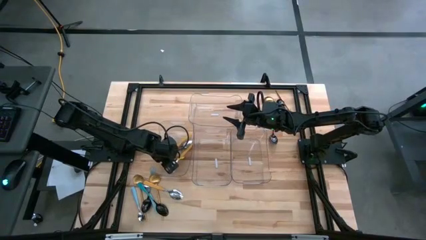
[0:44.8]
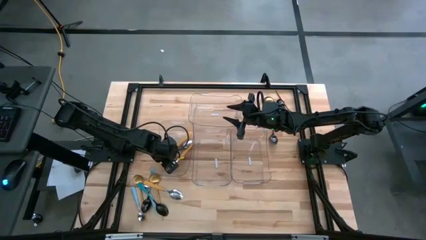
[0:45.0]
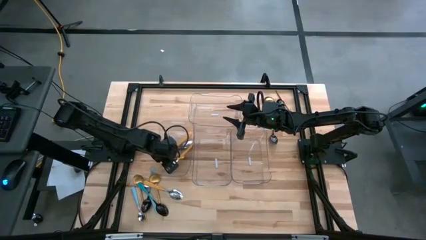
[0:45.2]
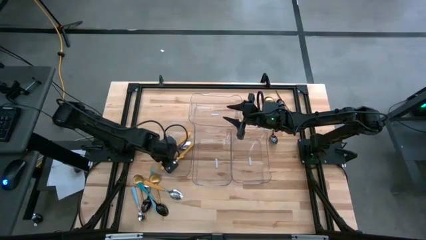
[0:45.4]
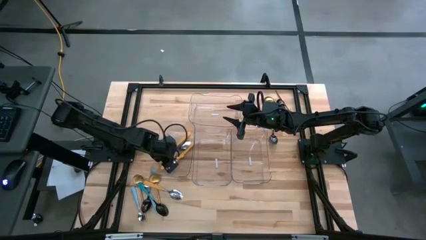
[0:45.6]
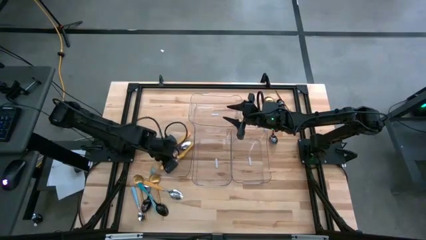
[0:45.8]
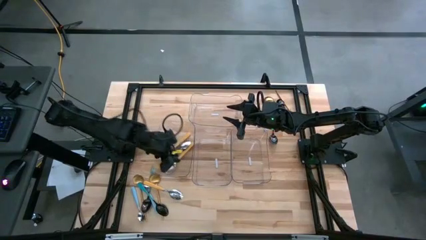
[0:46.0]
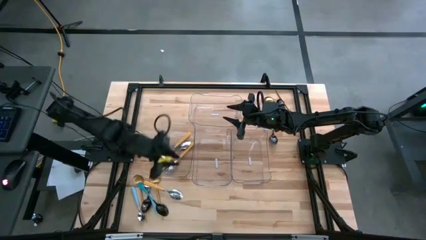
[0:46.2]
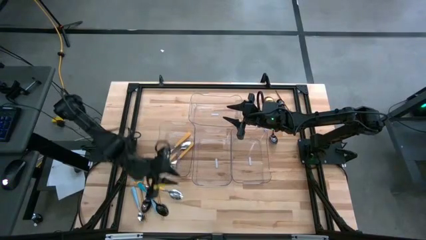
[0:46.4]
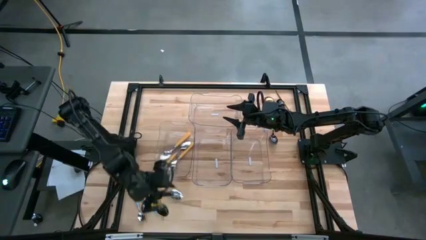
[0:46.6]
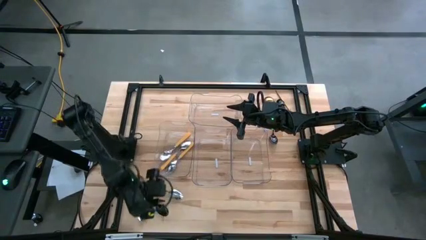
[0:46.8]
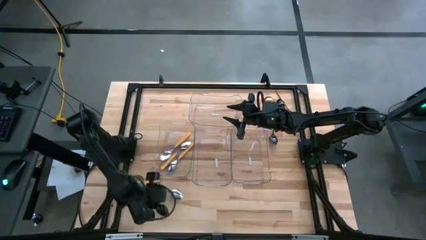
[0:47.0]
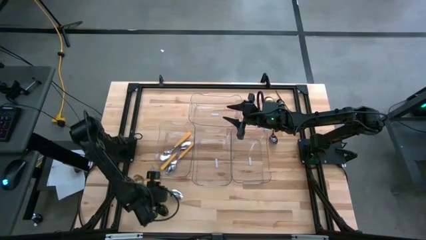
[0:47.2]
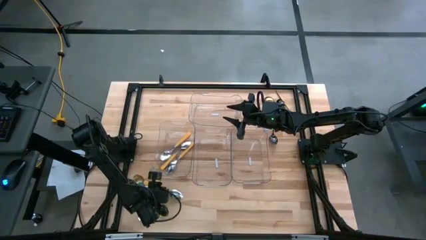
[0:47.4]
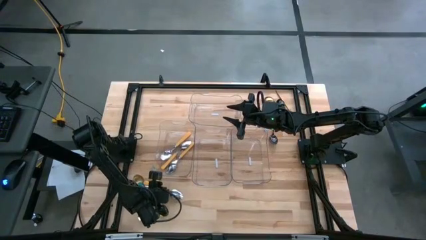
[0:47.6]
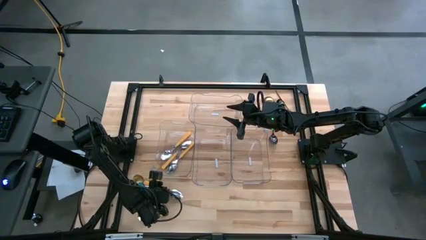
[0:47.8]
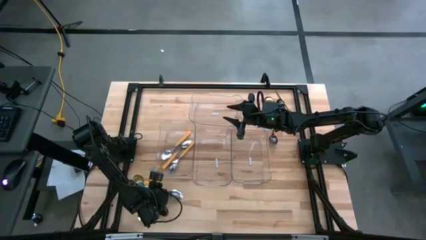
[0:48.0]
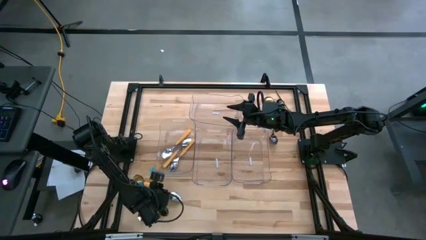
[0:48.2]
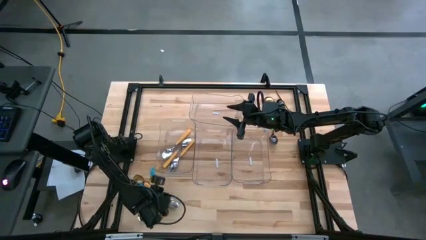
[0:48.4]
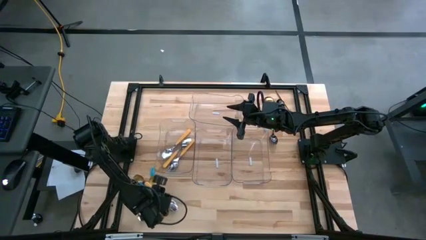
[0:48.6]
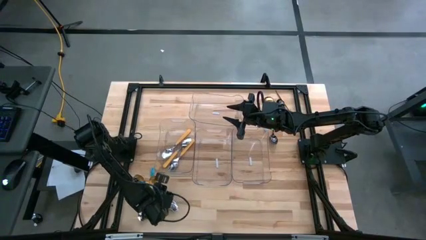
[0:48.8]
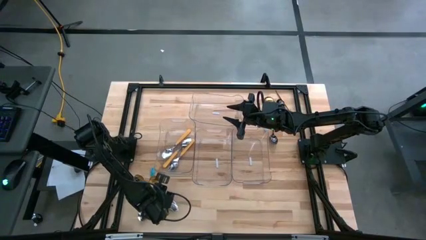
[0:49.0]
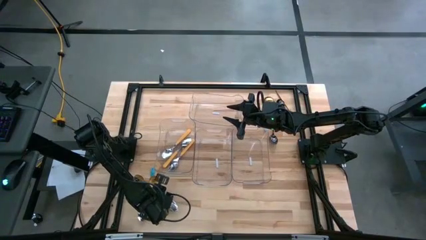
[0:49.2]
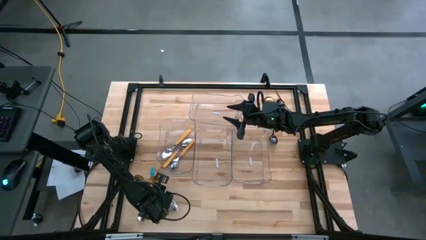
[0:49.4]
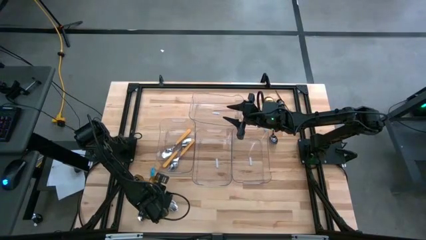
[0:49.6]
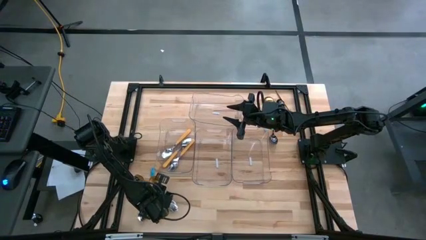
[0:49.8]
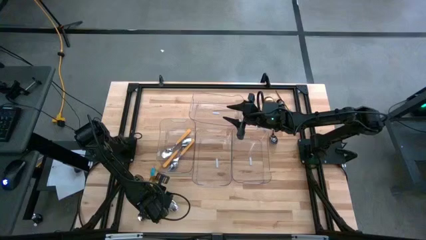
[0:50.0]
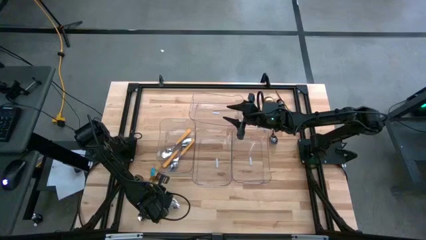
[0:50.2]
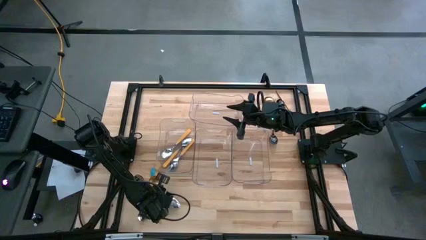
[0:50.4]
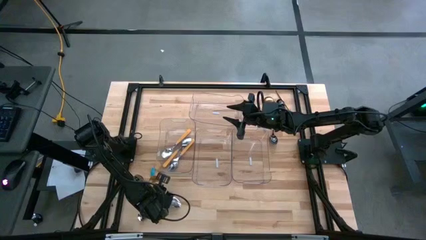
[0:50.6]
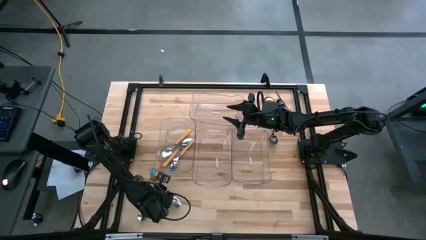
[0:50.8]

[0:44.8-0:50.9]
Task: Sort silverware by color (type)
Put the yellow spoon into the left transparent bin

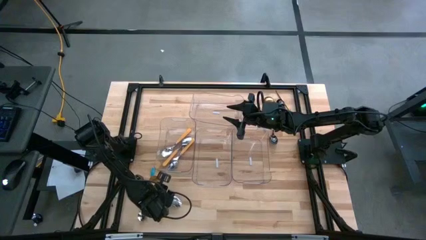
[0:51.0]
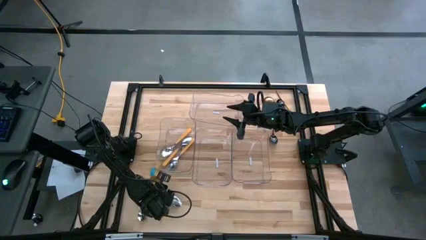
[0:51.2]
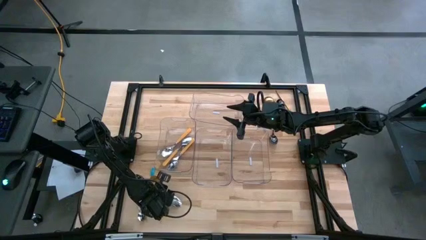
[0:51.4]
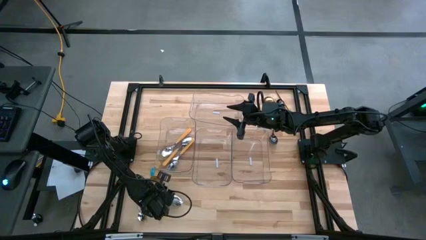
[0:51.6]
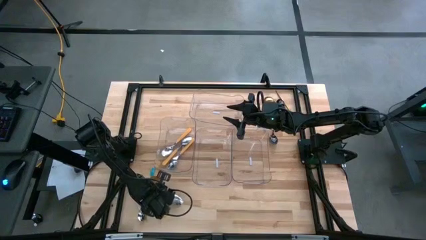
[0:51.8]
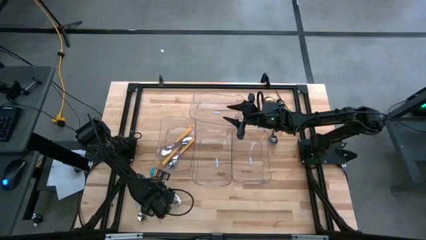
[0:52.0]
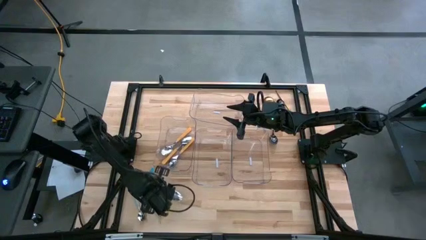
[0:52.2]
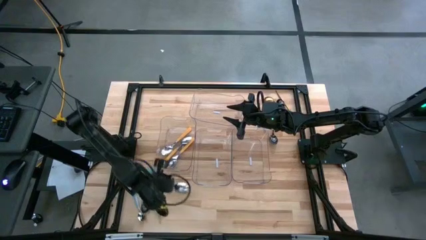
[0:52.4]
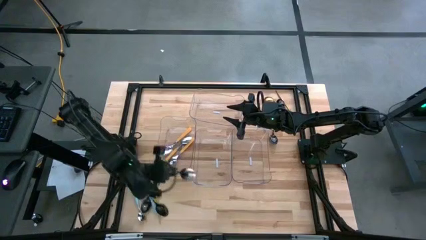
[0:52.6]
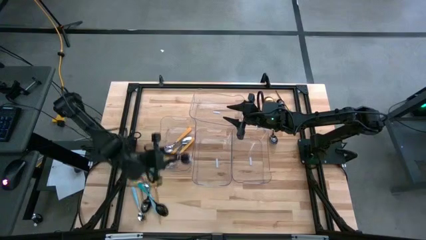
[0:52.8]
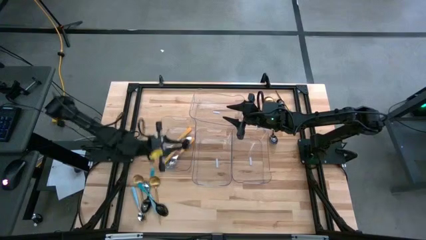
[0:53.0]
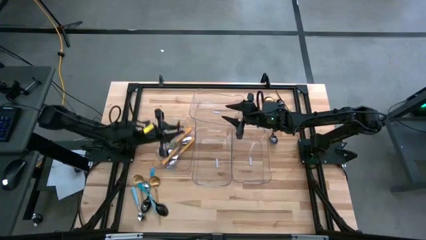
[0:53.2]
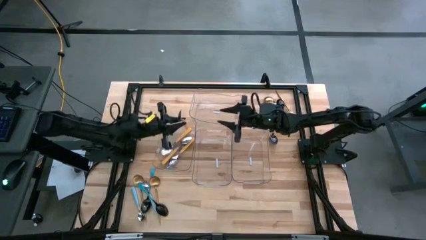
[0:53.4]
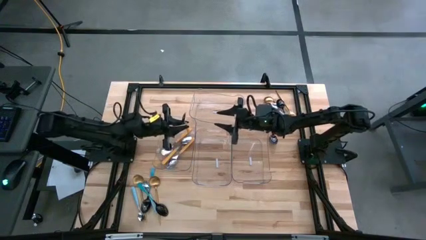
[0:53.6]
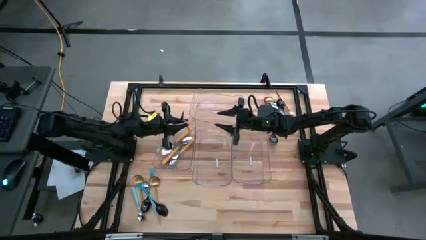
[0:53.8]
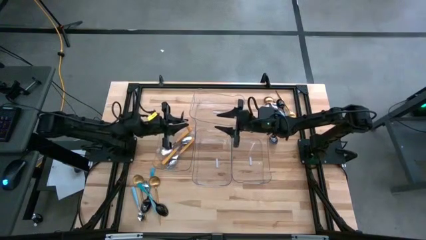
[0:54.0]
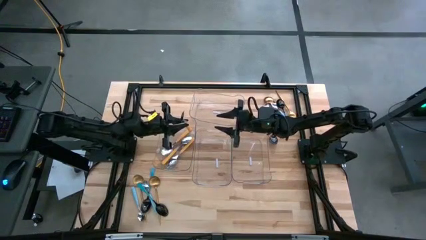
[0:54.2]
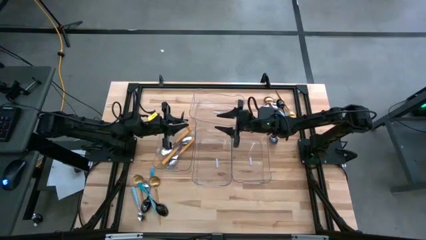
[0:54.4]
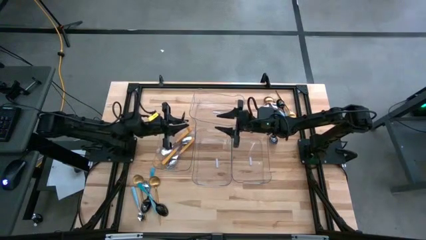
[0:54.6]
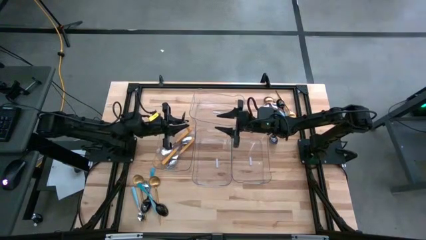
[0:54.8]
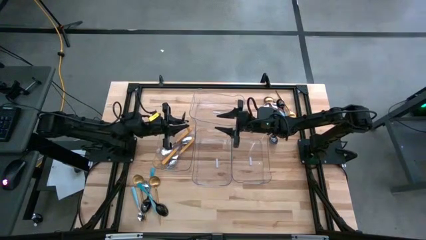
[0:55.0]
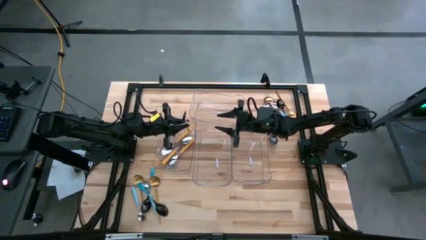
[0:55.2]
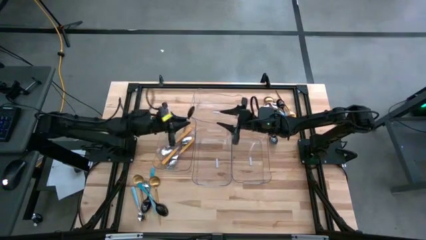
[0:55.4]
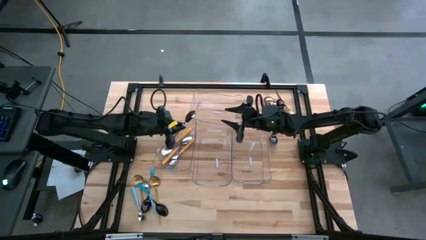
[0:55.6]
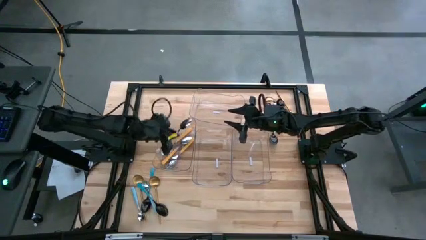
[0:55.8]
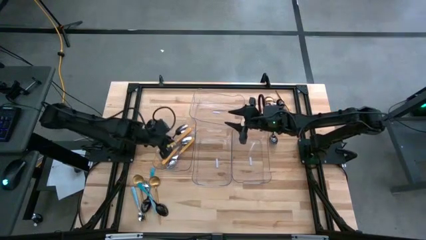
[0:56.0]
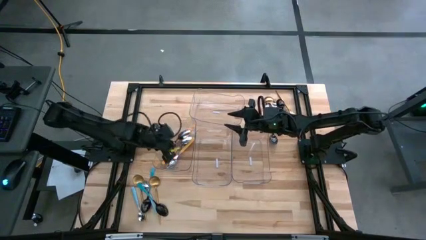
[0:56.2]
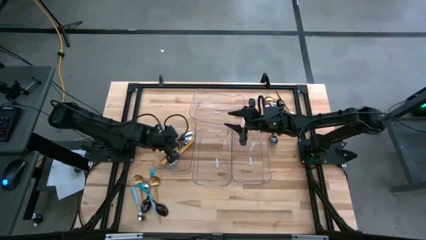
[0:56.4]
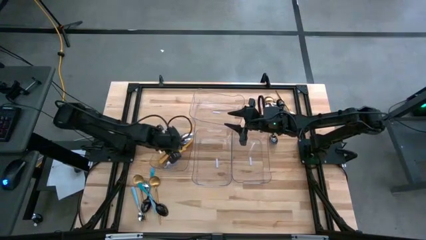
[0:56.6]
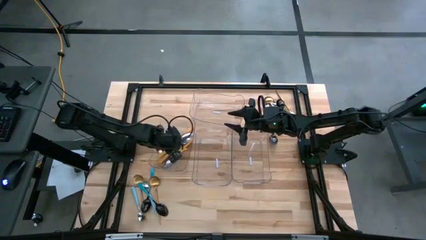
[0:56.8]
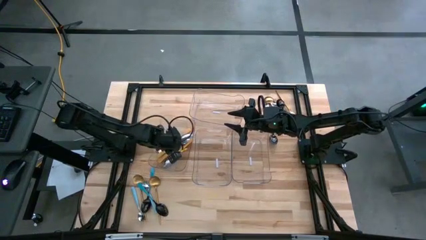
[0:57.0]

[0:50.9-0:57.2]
Put the yellow spoon into the left transparent bin

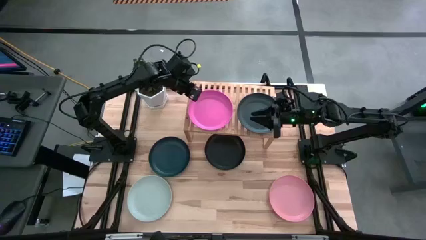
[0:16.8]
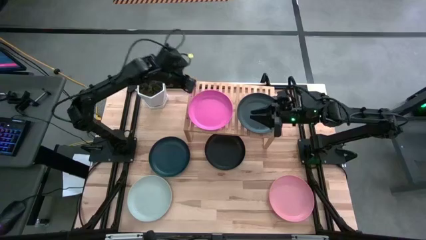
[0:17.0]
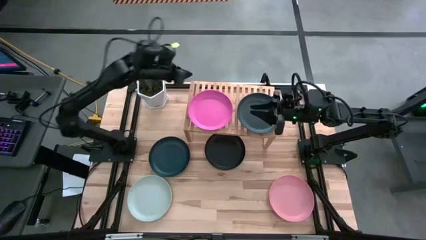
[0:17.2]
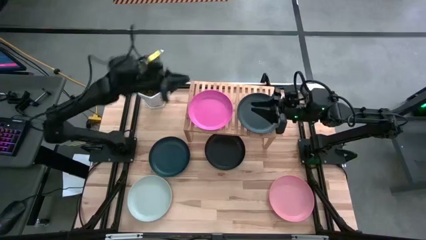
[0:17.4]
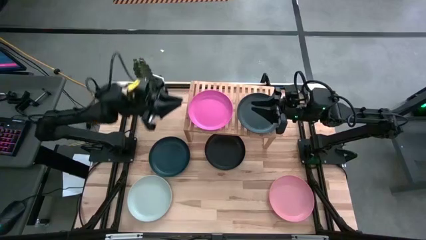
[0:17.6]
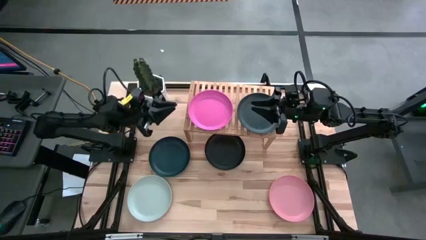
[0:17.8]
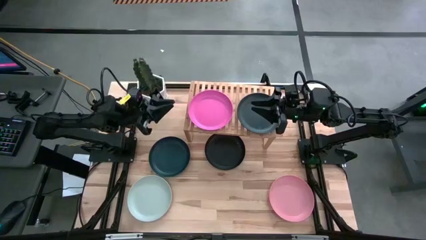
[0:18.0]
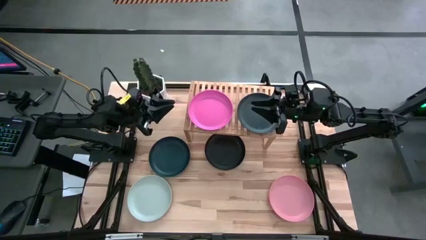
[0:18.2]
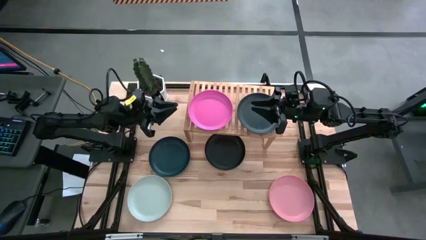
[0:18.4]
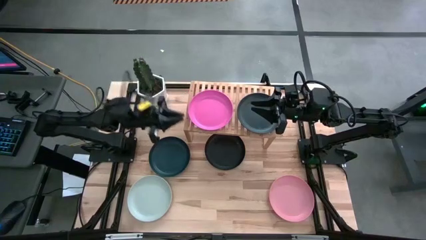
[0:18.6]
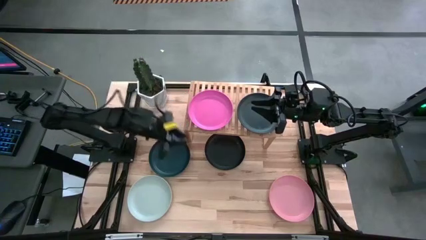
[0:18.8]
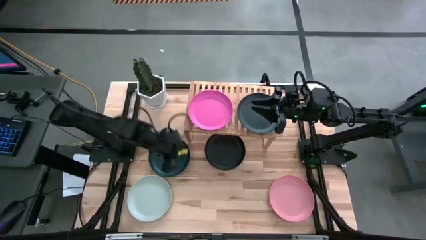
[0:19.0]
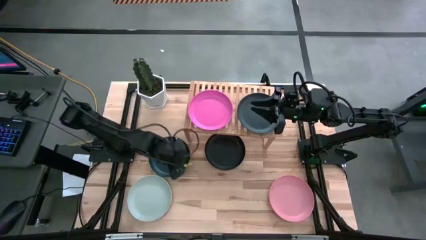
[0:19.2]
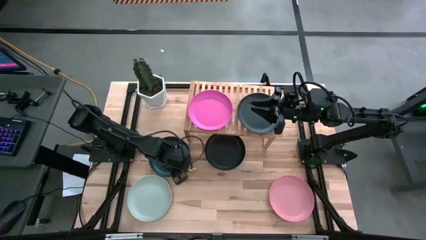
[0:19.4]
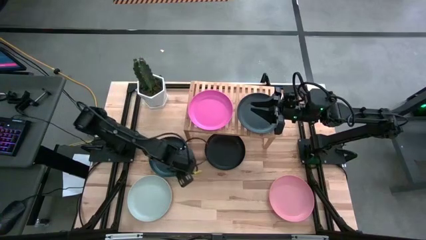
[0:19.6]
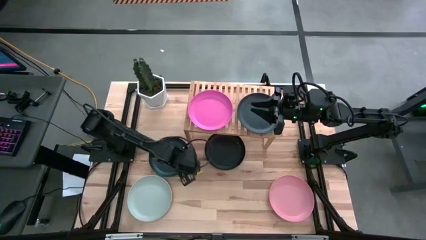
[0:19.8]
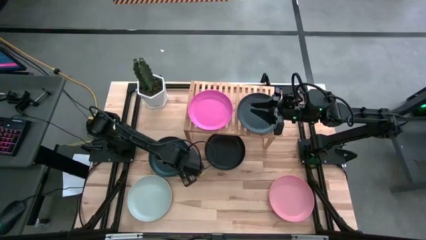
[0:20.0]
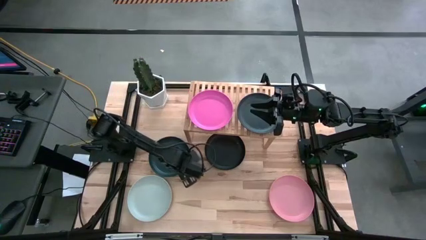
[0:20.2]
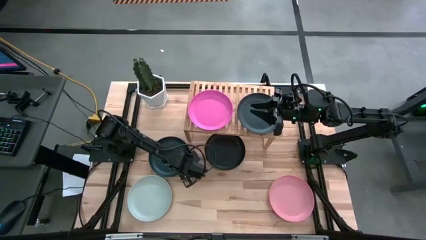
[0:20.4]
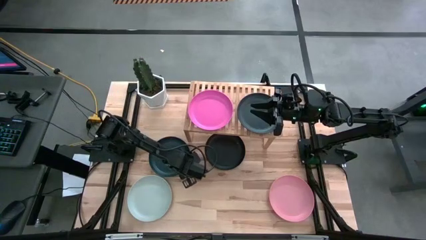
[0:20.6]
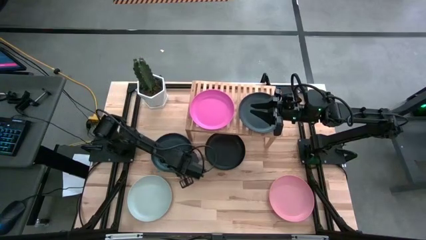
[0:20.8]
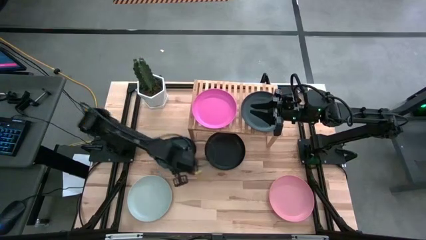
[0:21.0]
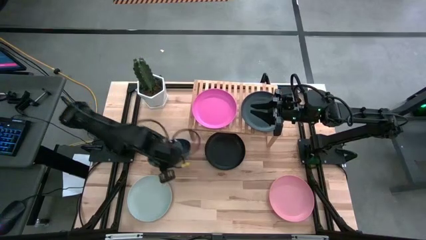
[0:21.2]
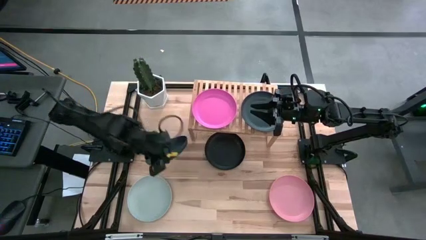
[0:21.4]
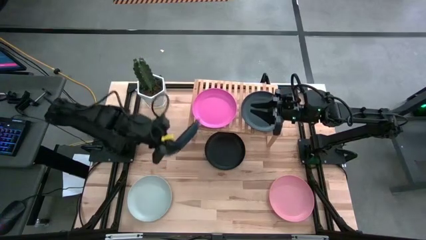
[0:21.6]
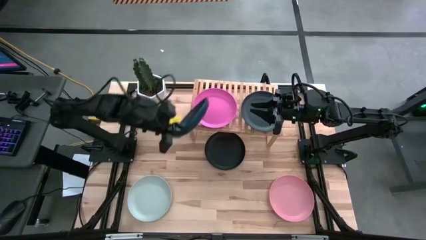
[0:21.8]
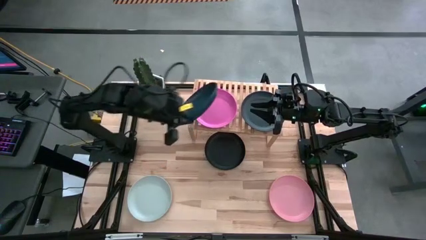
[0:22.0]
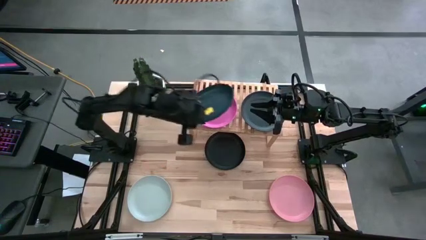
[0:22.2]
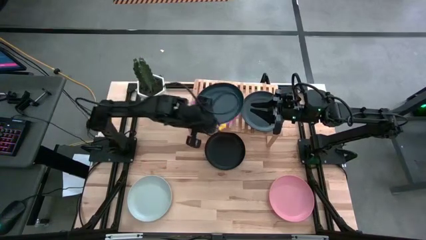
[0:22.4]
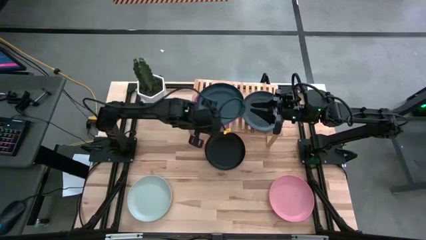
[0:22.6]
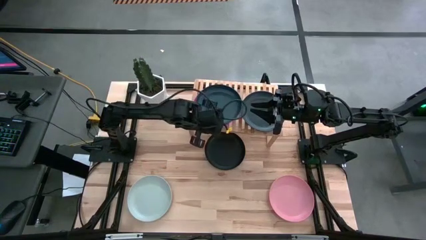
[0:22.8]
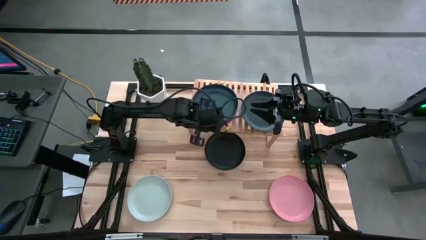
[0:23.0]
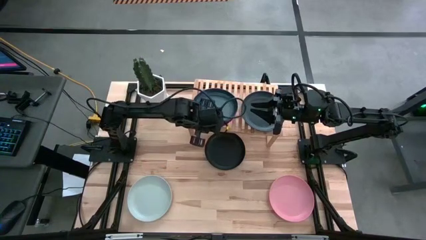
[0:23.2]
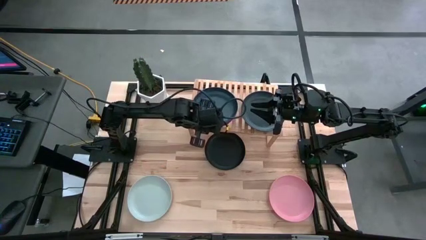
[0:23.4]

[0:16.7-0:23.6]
Task: Place and stack plates onto a shelf
Stack the dark blue plate on top of the pink plate on the shelf
